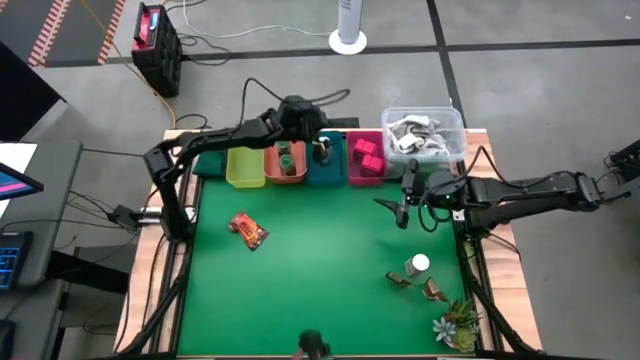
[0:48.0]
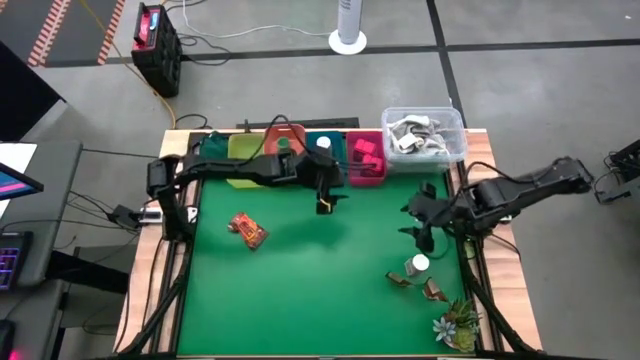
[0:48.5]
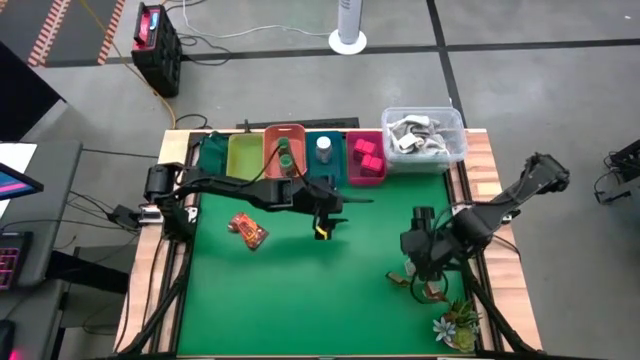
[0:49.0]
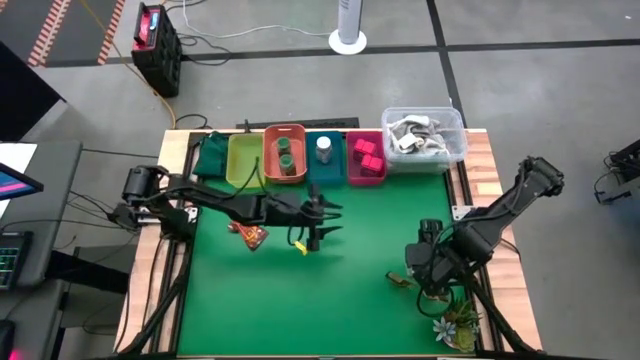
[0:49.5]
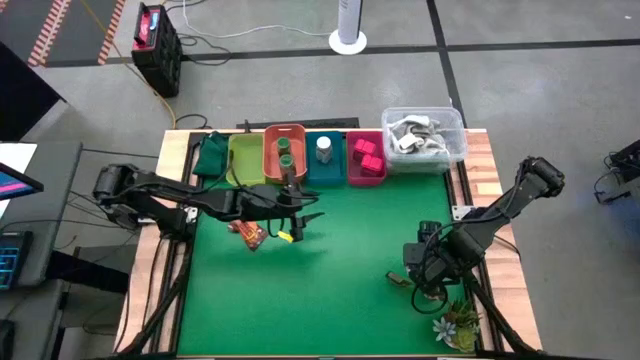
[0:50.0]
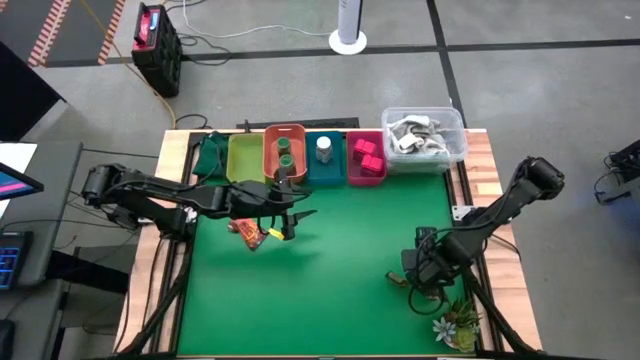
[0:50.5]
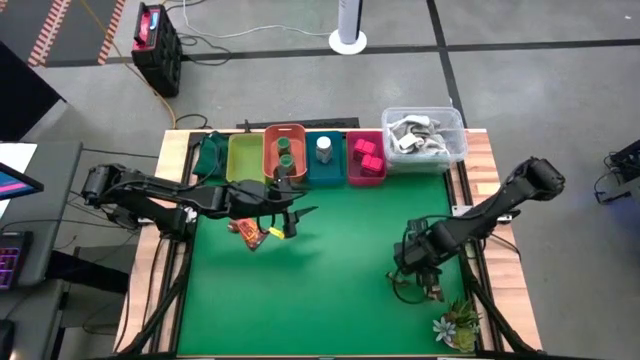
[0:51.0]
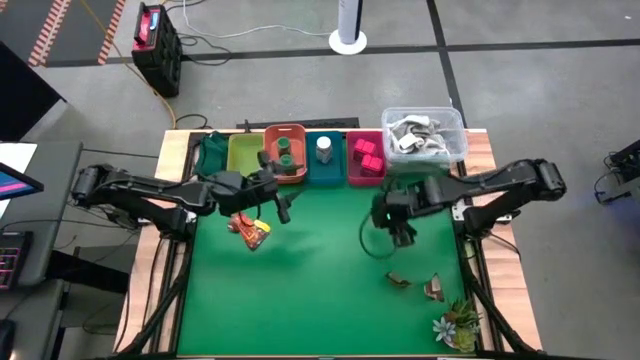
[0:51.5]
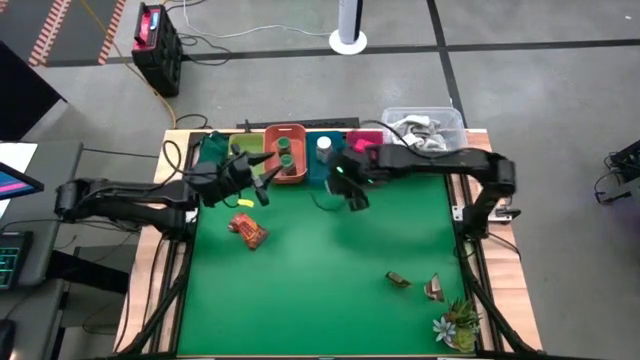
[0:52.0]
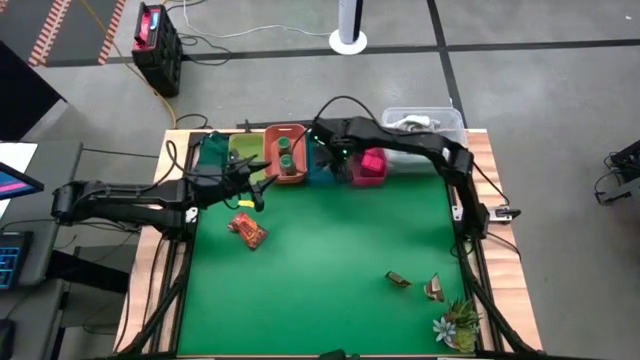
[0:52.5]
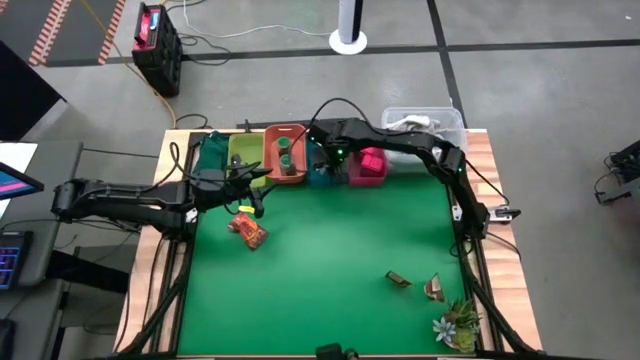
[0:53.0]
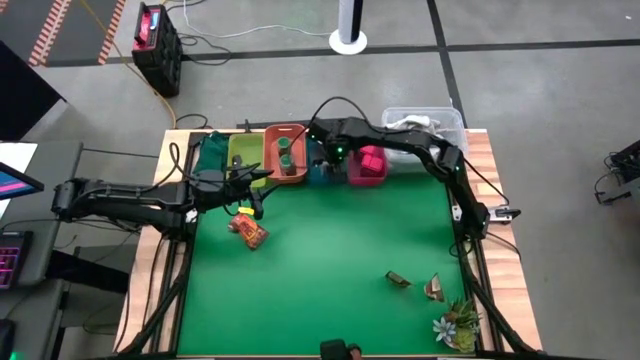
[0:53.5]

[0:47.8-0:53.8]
Task: Sort spices by type
Put the white spice bottle into the blue bin

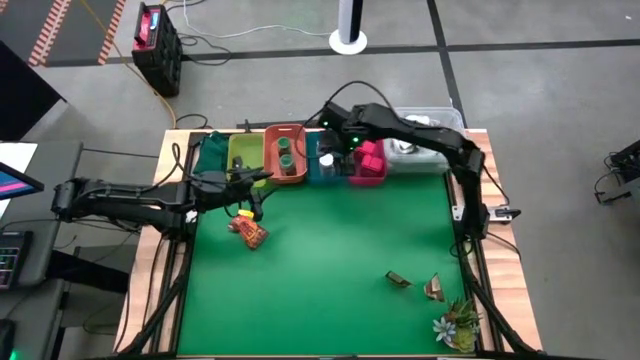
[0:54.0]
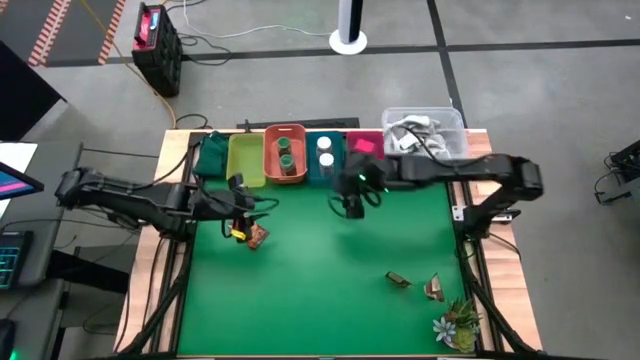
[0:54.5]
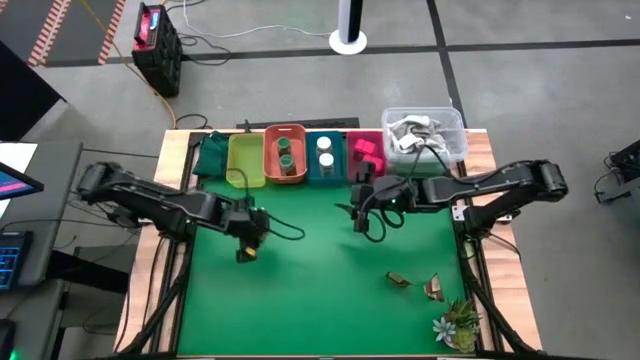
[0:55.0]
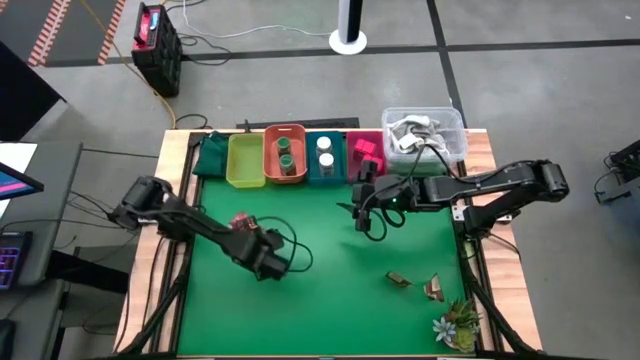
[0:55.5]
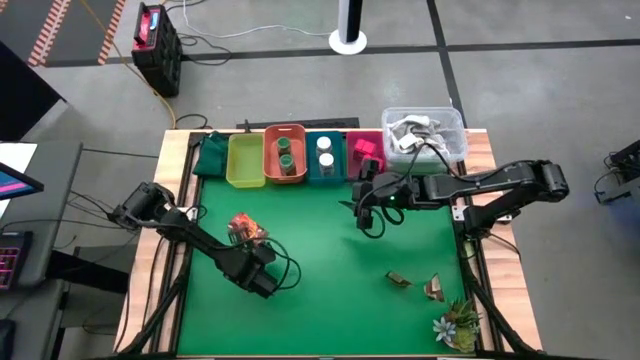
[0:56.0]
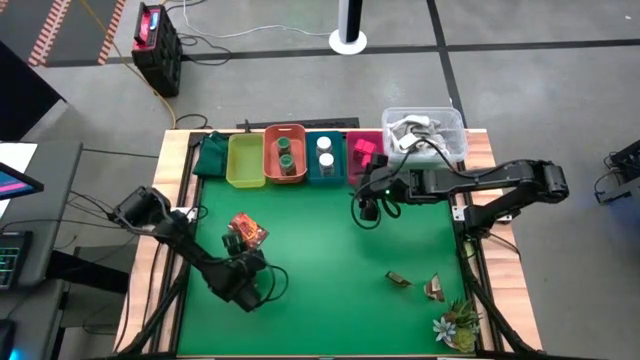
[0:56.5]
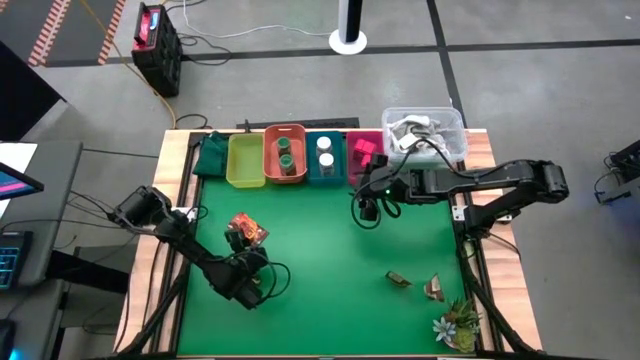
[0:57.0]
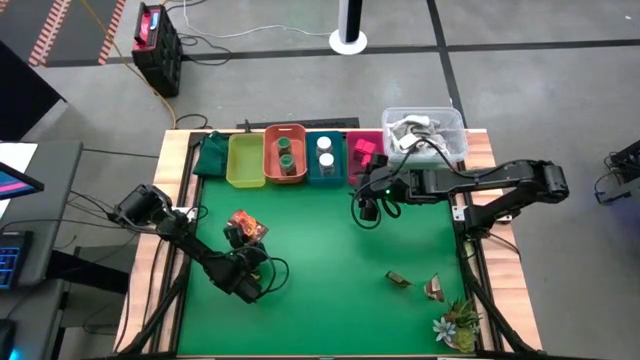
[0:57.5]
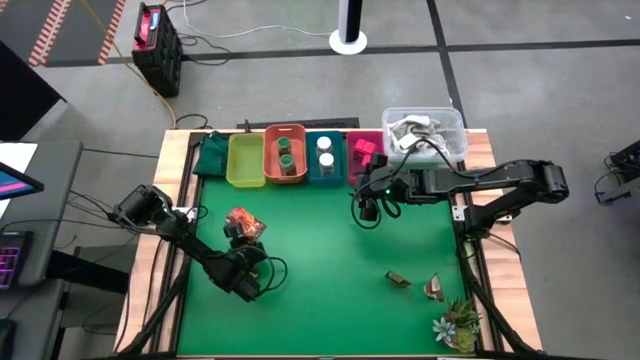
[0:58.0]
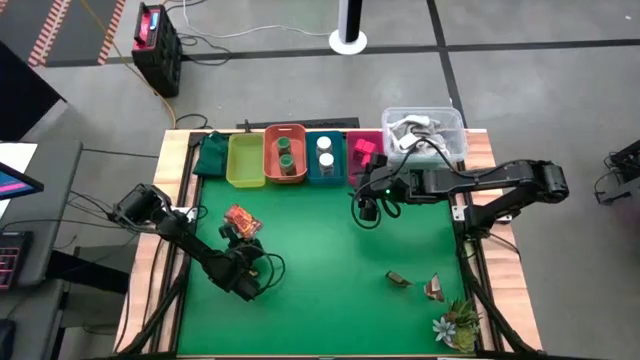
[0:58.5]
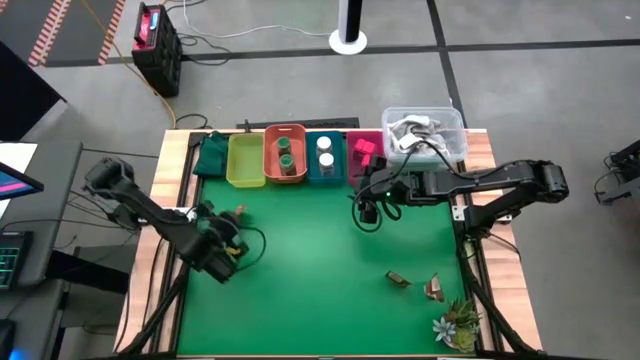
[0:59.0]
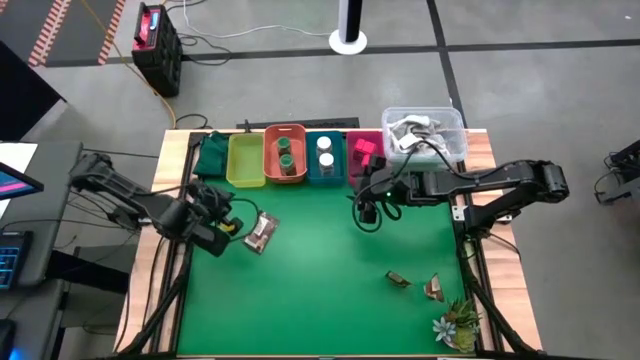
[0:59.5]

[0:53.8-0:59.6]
Put the top left orange spice pack into the yellow bin

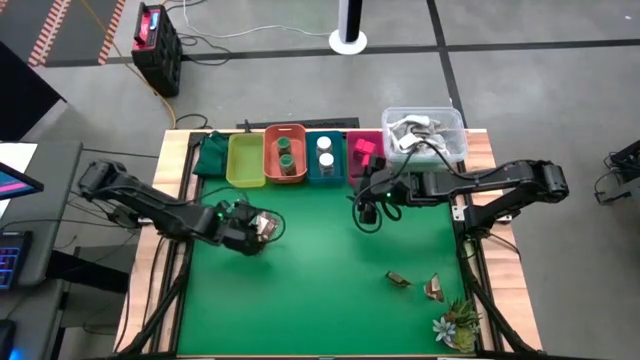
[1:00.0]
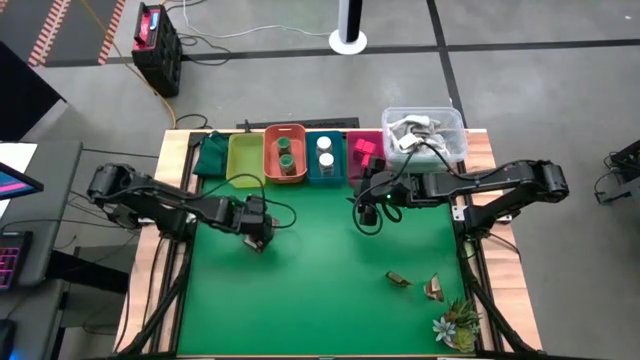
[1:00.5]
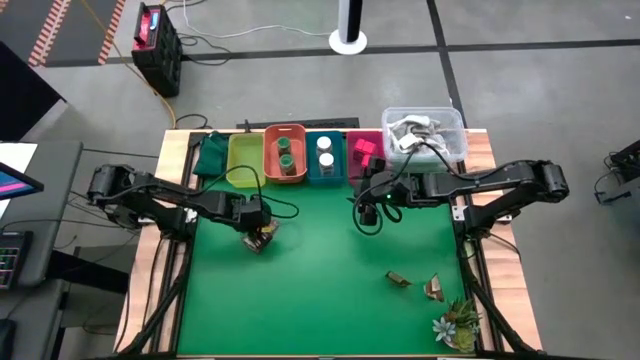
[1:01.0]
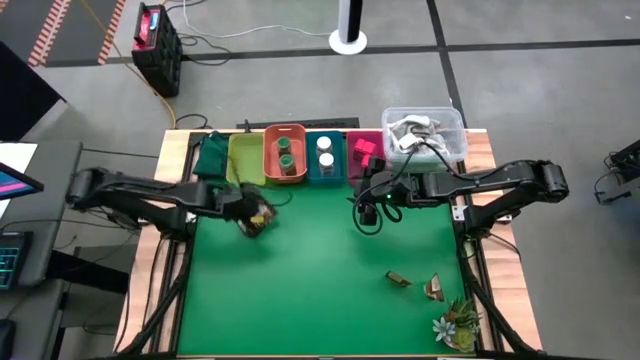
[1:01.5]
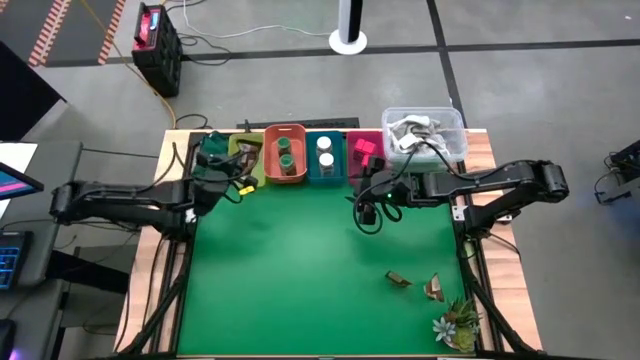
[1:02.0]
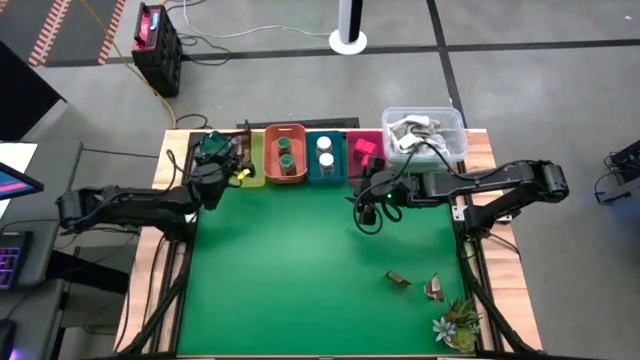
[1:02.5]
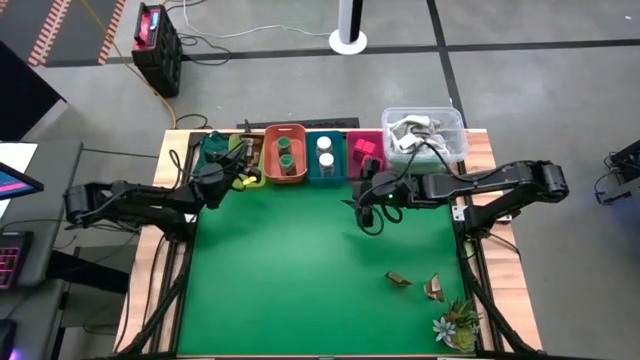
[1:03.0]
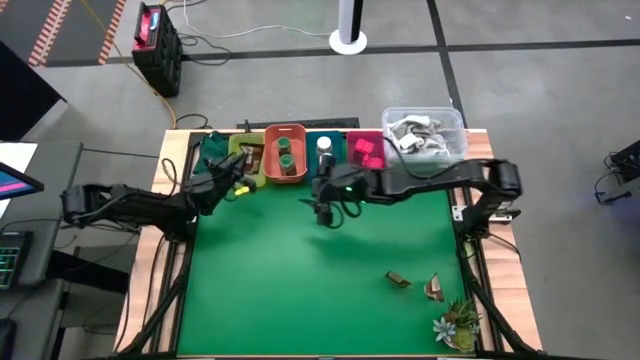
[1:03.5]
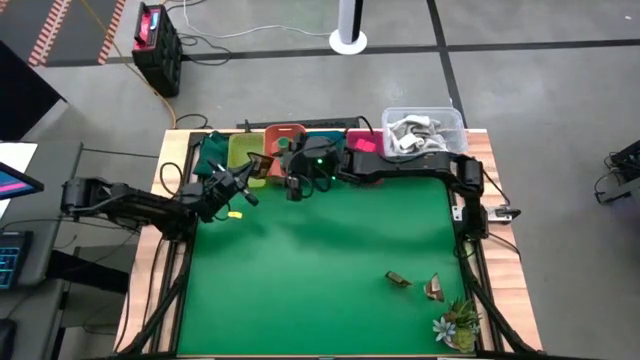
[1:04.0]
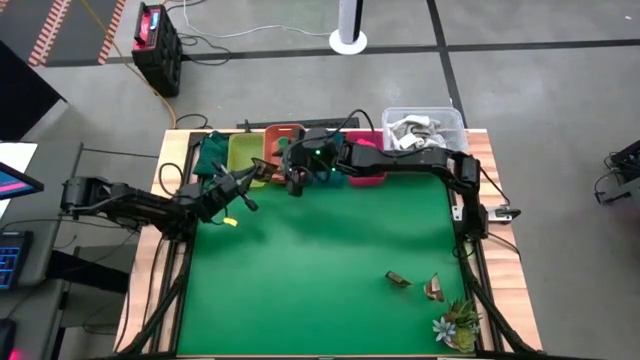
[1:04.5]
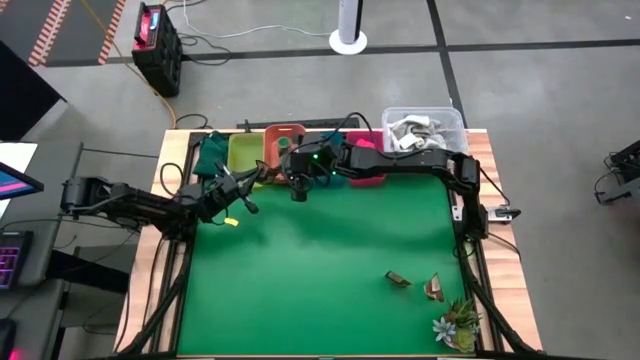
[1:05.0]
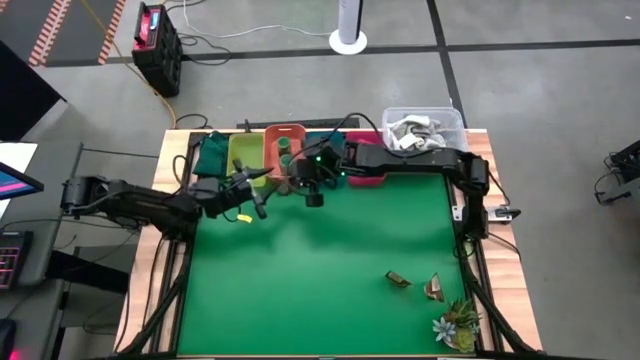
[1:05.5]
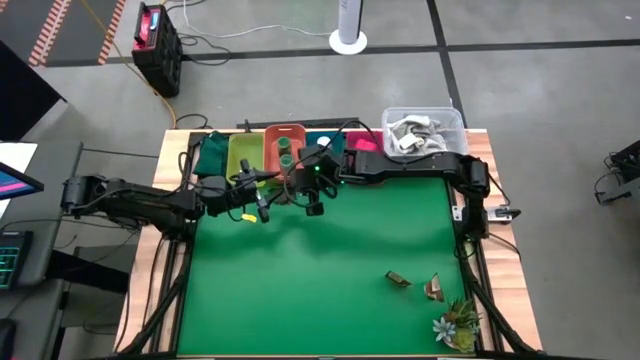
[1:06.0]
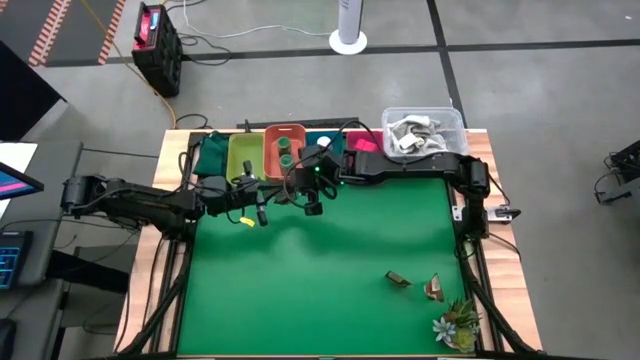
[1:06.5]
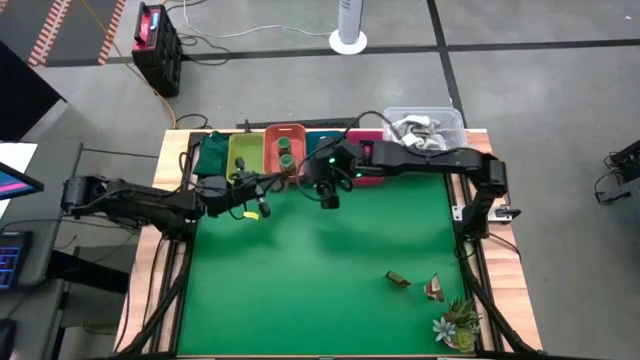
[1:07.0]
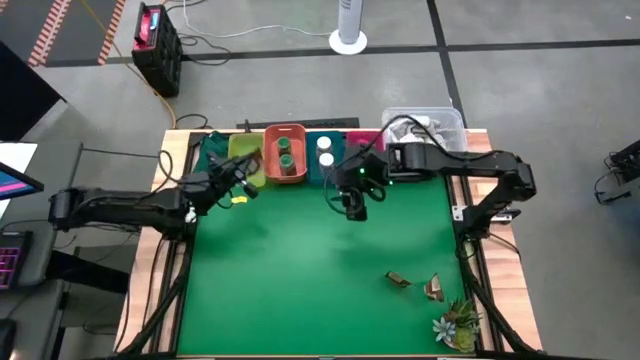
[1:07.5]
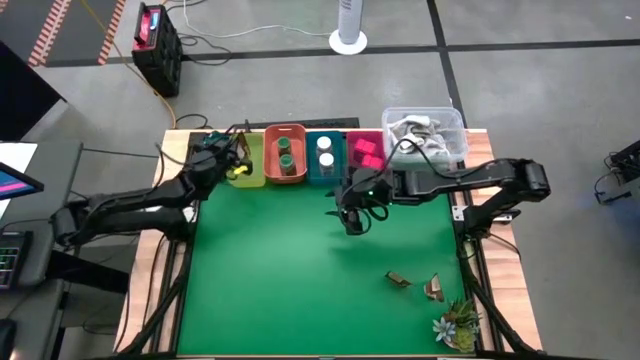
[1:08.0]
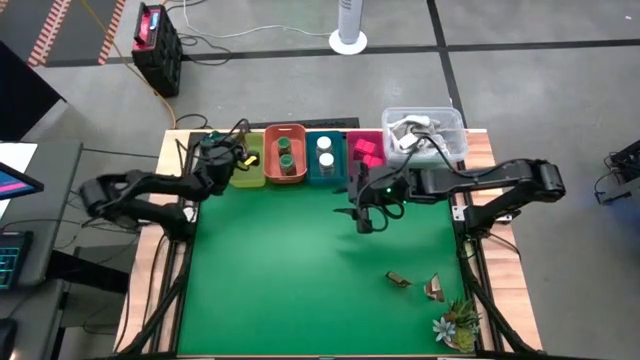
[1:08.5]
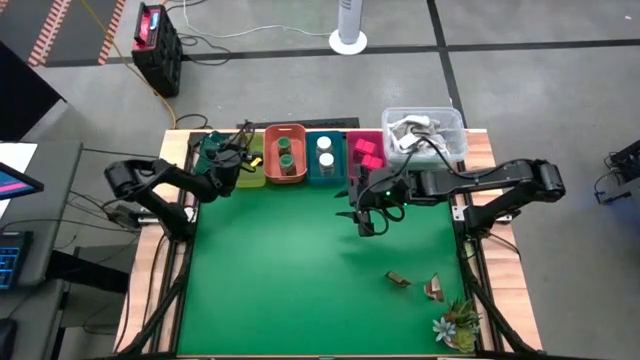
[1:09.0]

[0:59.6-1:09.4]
Put the top left orange spice pack into the yellow bin
